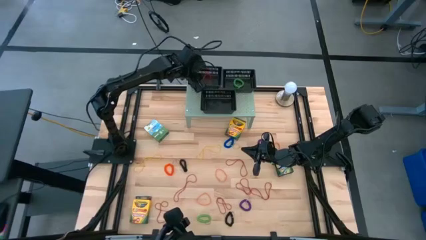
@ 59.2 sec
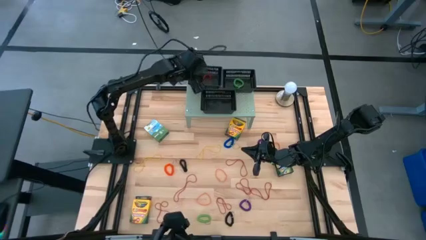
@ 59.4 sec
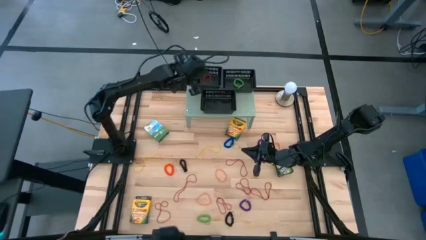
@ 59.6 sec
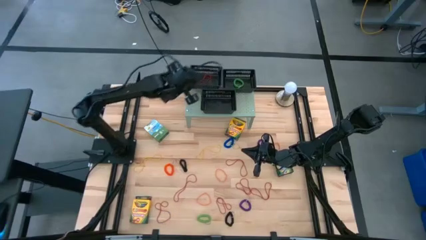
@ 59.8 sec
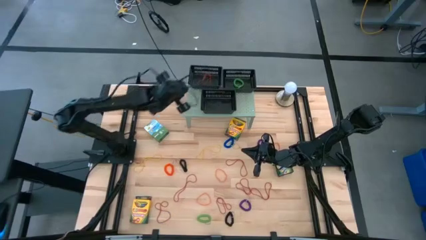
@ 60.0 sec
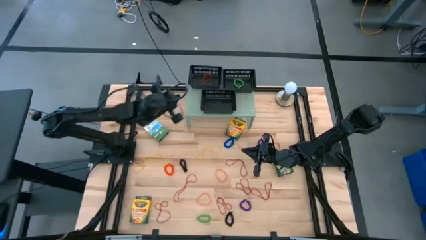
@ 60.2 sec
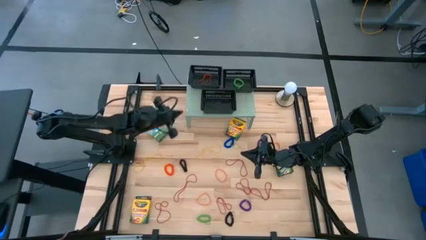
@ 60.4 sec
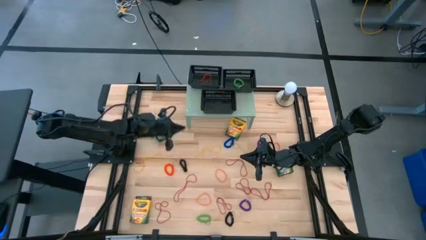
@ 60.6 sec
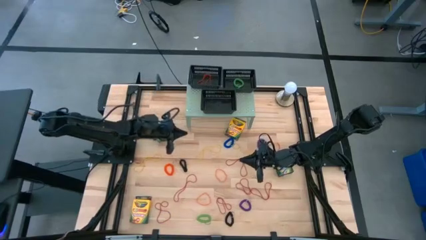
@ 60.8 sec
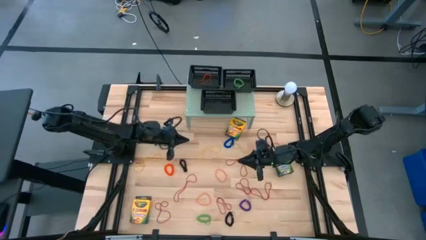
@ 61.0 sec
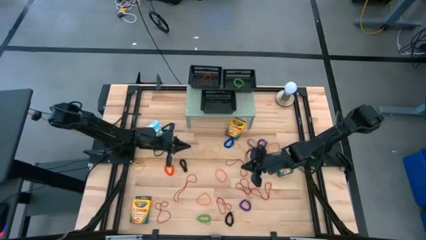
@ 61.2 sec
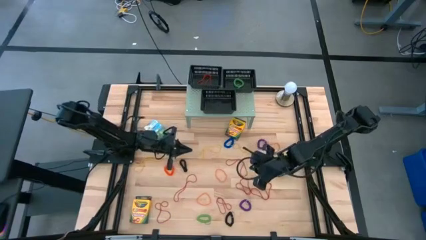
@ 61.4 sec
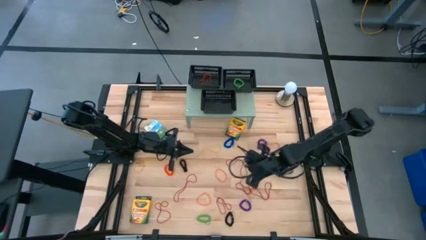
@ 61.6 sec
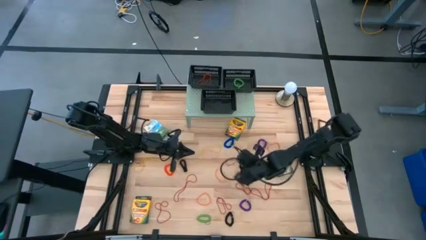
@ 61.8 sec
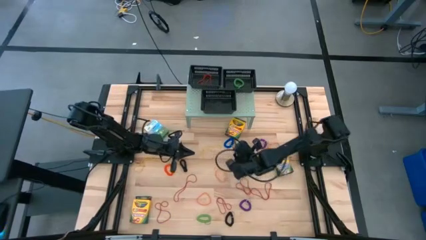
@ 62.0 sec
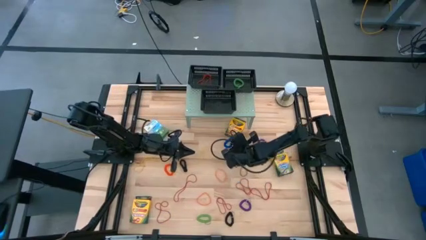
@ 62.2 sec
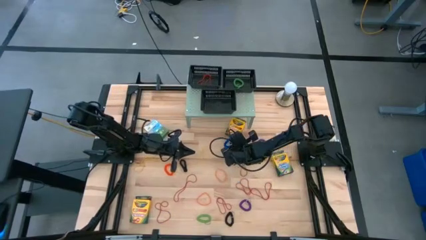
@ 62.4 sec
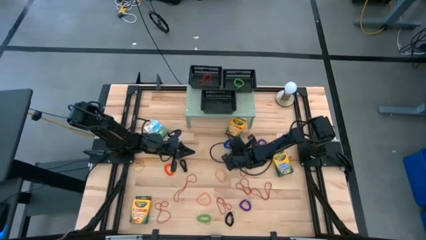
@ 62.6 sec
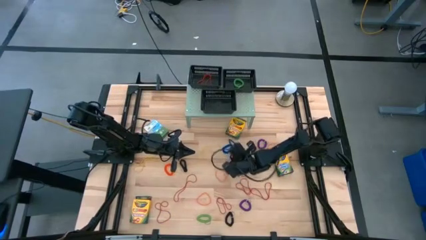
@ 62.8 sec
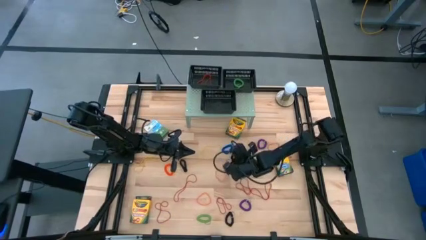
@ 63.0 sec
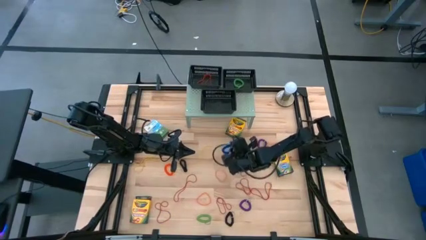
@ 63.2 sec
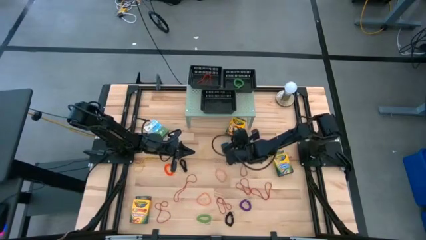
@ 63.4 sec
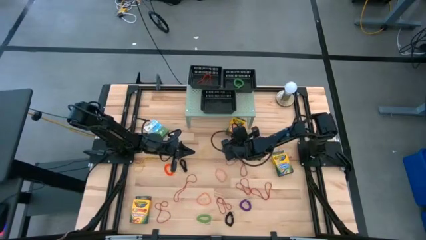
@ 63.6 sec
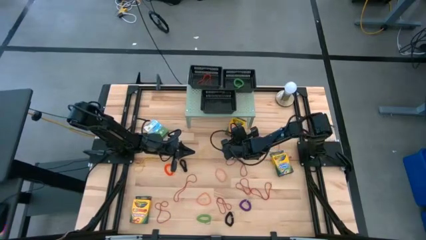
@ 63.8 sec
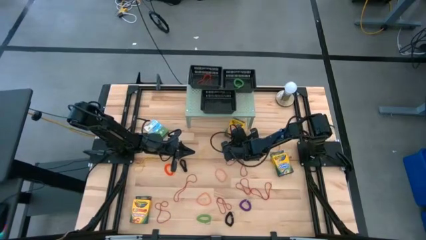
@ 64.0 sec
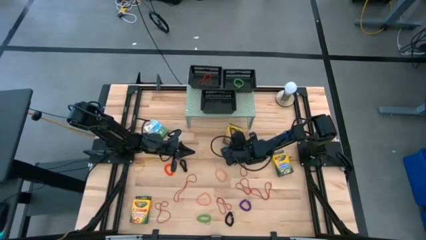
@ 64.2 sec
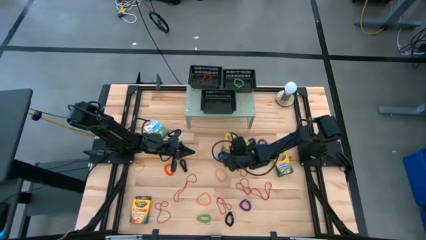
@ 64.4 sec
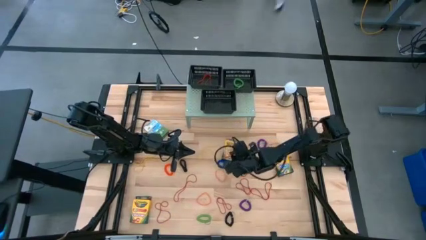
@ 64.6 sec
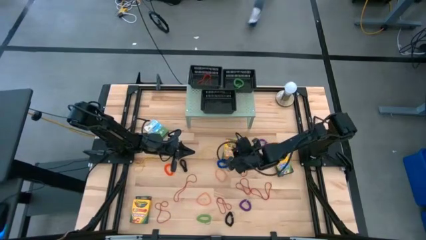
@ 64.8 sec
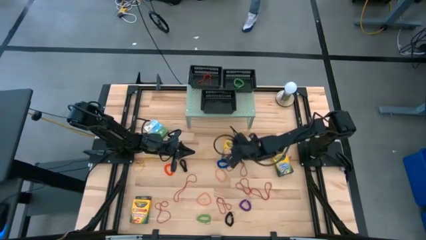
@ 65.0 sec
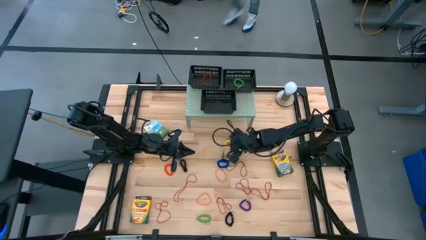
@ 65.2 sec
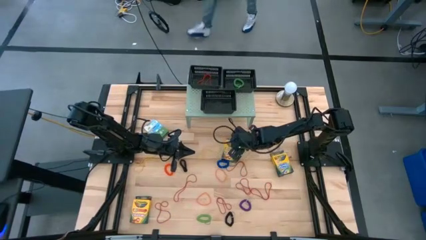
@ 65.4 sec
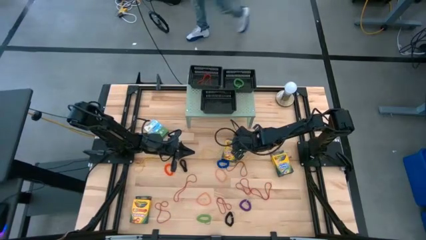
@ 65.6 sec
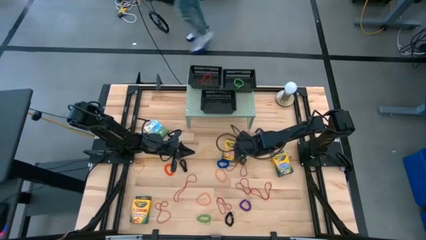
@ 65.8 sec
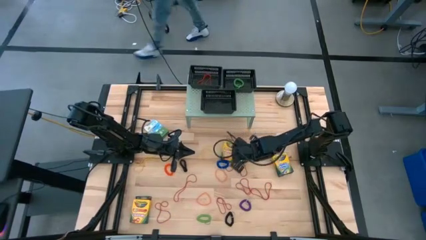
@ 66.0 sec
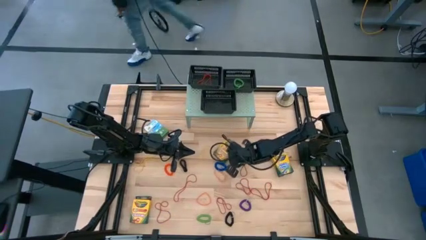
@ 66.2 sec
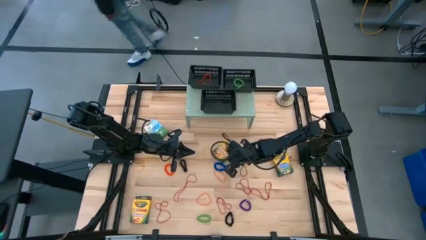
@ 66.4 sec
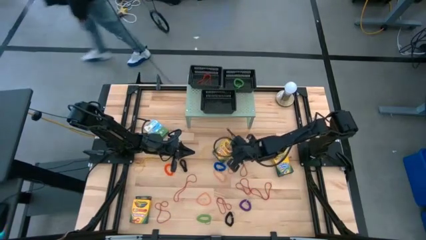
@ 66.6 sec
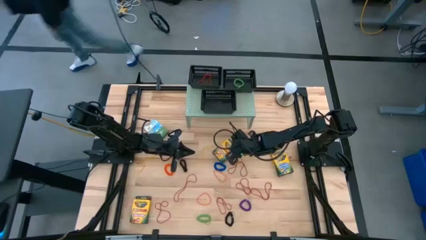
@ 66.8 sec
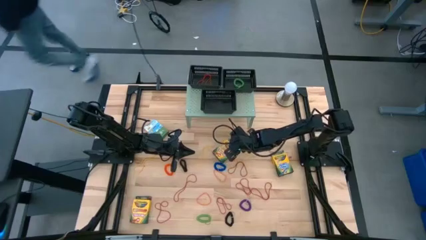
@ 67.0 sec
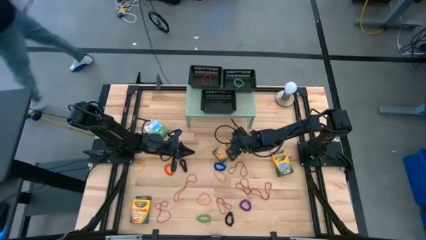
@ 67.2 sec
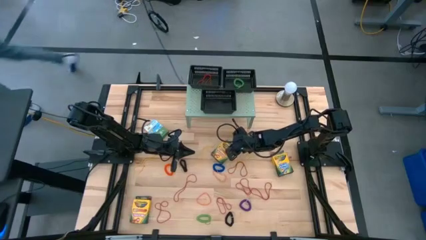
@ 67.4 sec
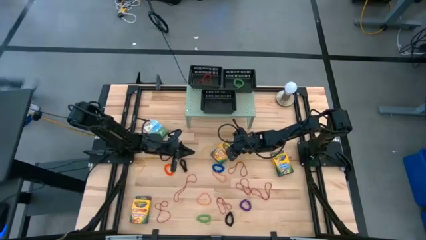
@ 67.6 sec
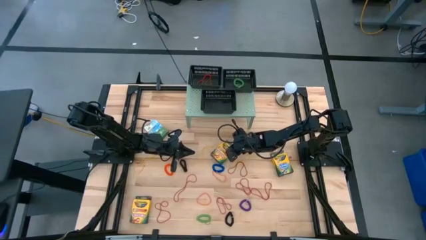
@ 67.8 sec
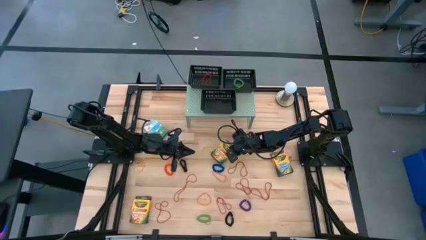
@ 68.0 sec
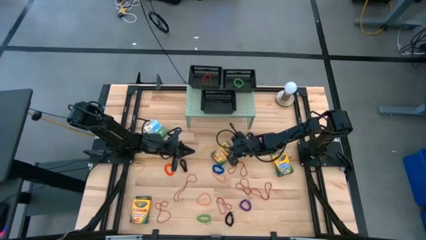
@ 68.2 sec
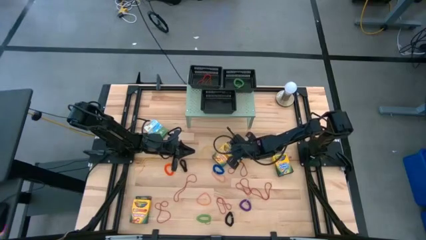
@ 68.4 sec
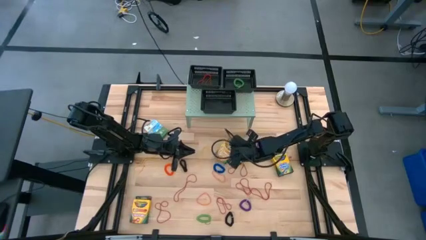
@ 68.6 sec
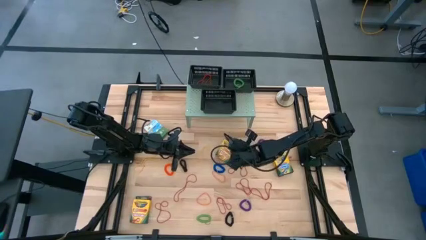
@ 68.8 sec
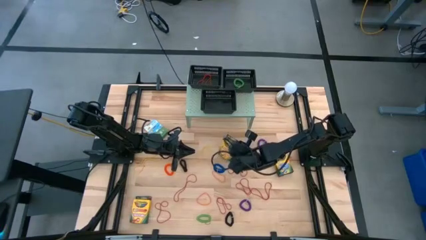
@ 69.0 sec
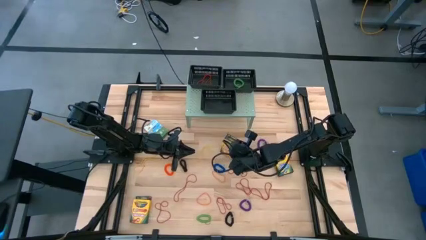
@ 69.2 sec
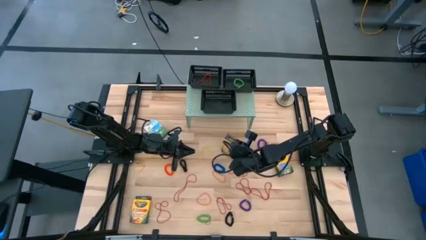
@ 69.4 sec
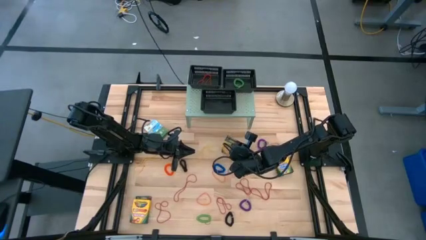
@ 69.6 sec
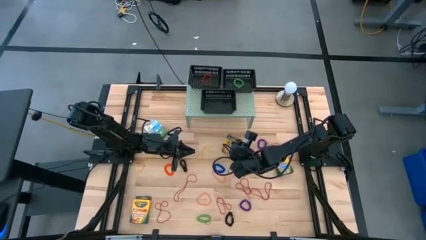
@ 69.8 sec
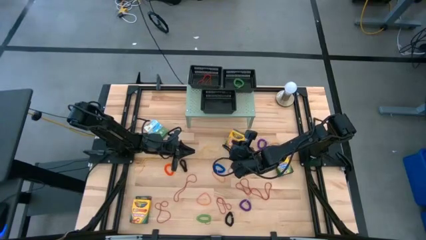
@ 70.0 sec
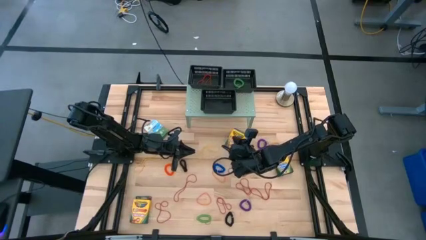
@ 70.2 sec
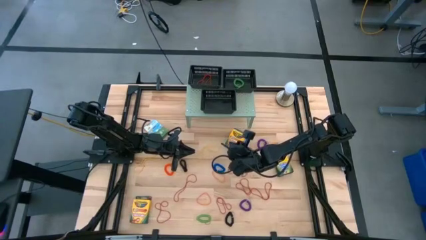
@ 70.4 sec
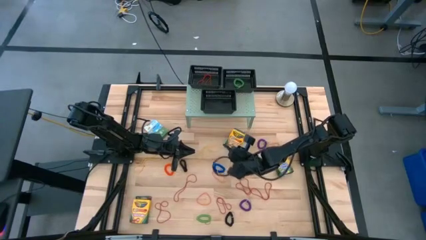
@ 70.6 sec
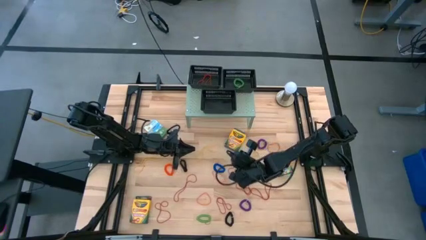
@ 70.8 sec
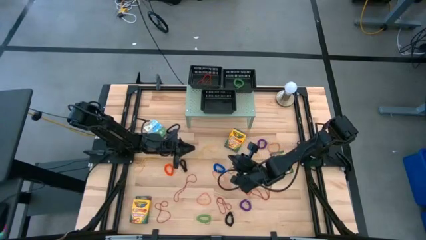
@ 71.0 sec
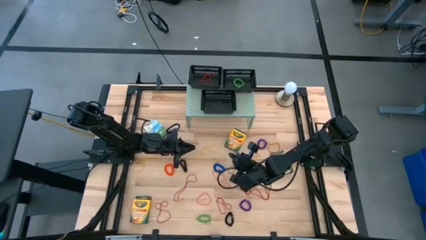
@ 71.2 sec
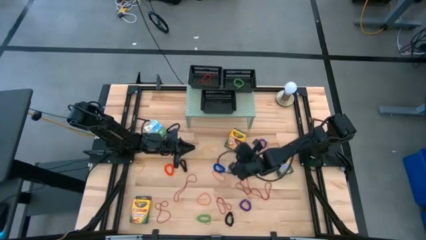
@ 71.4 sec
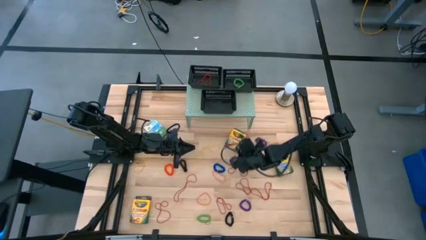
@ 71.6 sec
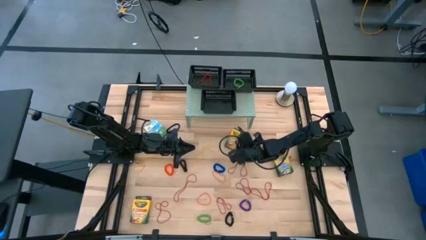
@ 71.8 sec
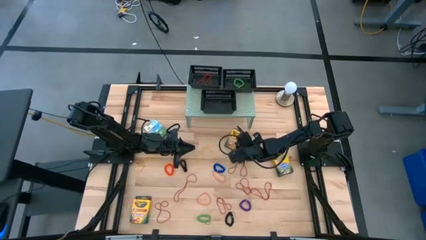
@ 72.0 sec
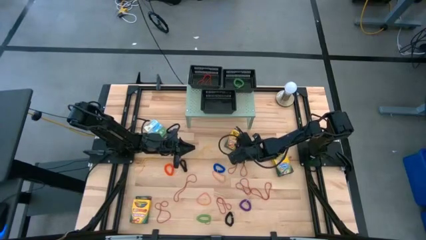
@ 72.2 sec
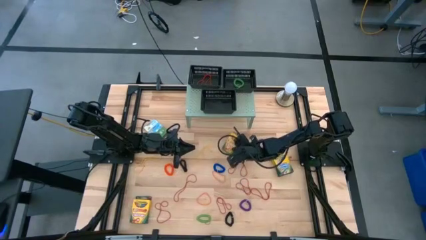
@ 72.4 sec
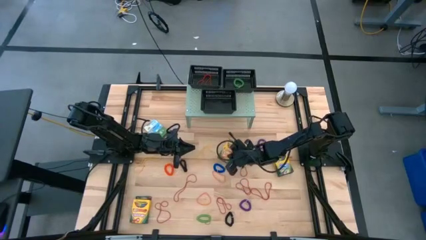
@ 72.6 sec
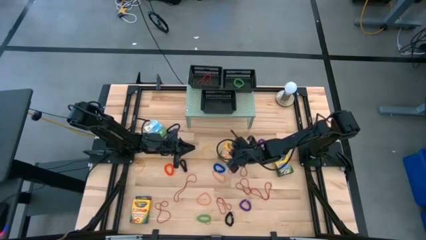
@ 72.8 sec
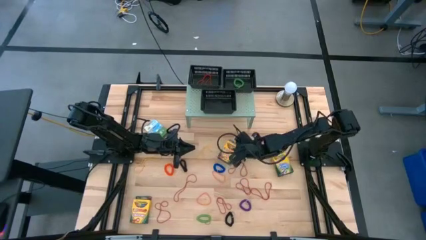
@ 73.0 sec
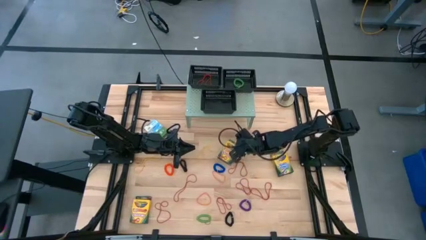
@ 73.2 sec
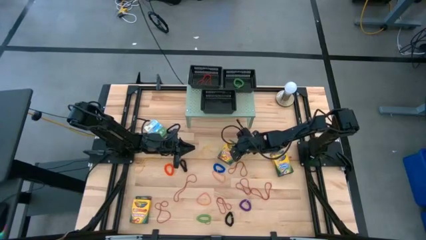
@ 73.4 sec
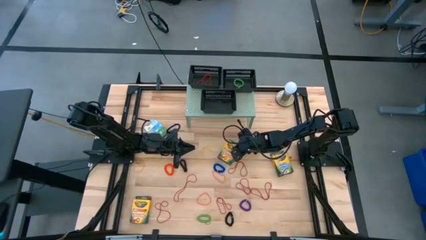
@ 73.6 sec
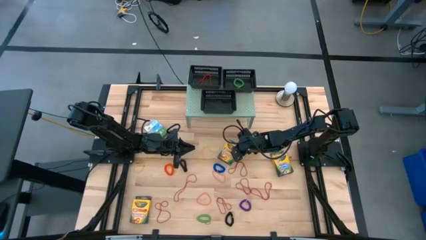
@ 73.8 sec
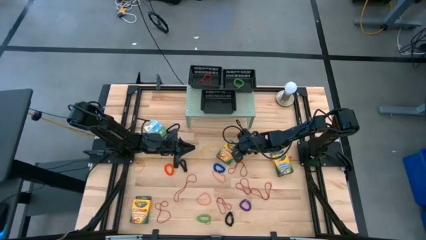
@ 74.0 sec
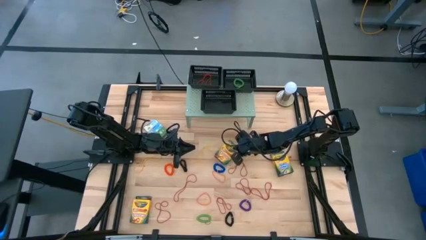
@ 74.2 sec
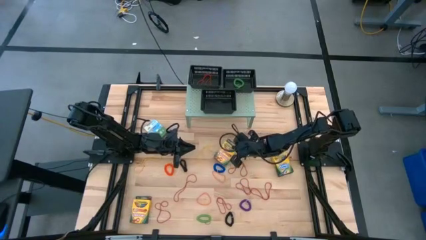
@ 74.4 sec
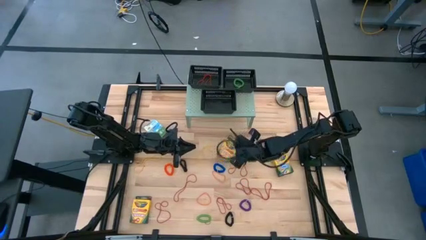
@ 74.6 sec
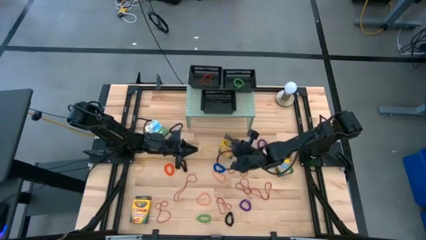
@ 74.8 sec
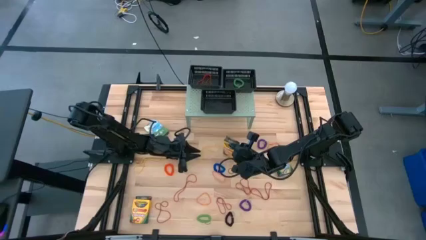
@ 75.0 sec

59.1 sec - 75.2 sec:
Task: Pick & Place Office Desk Supplies
Put the yellow crayon box into the bottom black bin
